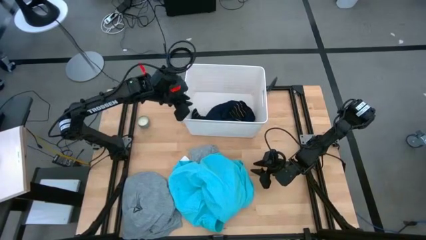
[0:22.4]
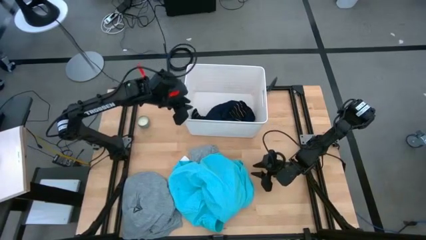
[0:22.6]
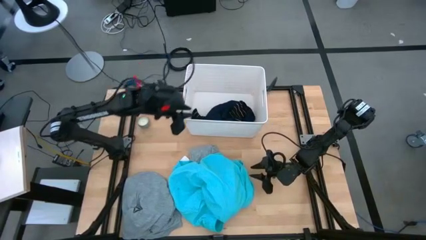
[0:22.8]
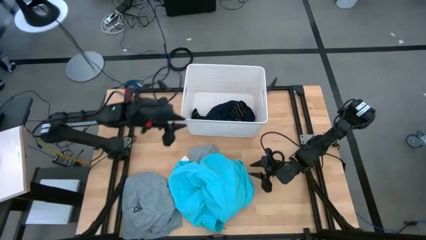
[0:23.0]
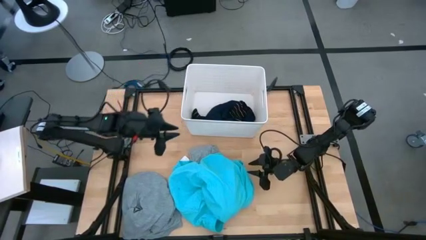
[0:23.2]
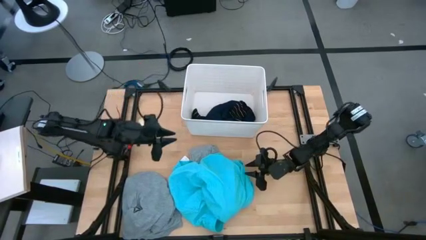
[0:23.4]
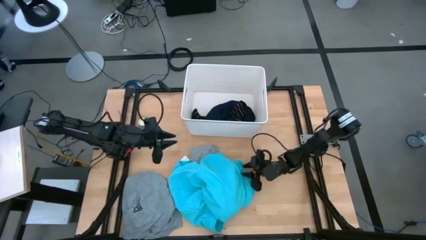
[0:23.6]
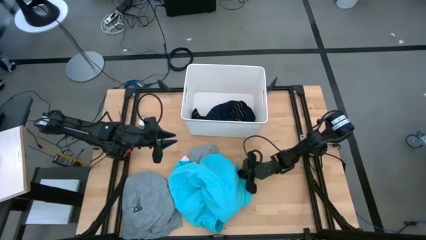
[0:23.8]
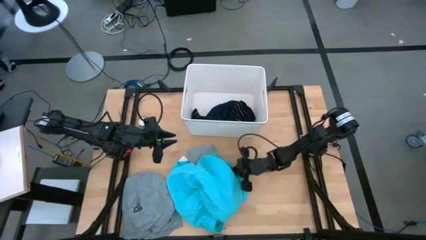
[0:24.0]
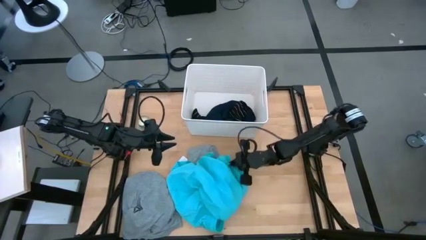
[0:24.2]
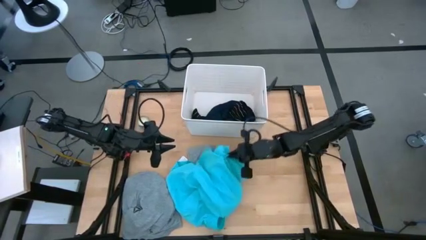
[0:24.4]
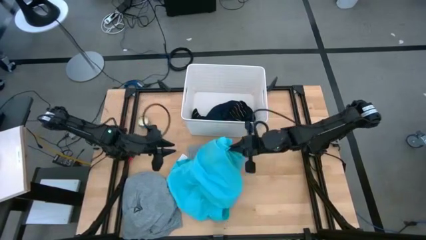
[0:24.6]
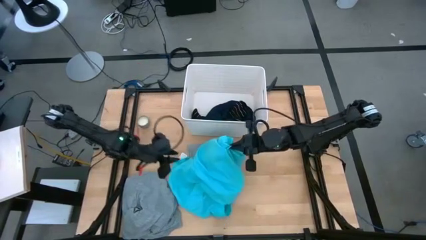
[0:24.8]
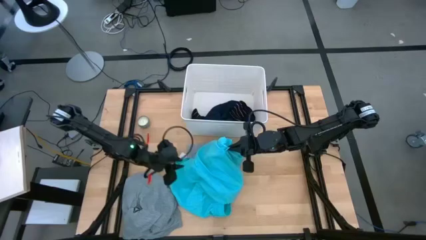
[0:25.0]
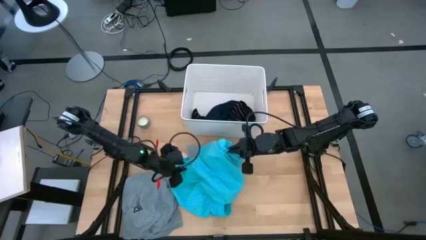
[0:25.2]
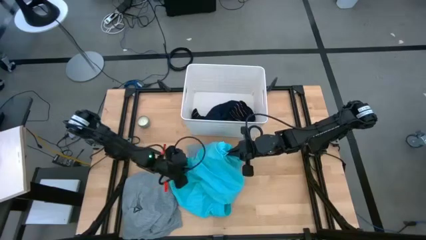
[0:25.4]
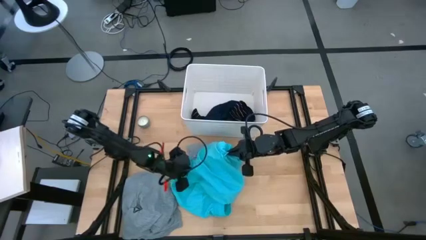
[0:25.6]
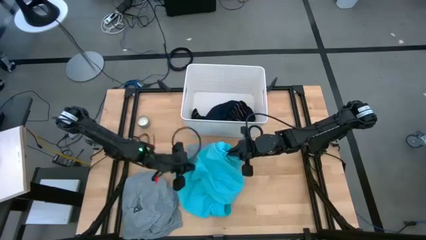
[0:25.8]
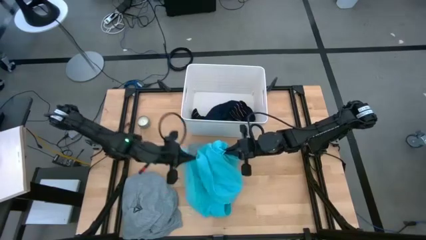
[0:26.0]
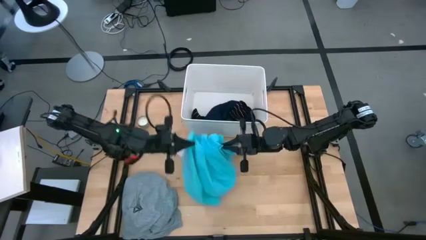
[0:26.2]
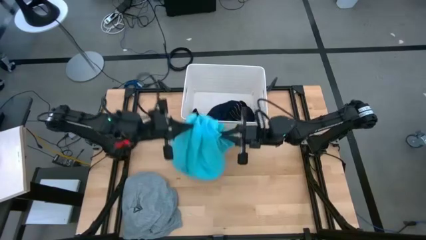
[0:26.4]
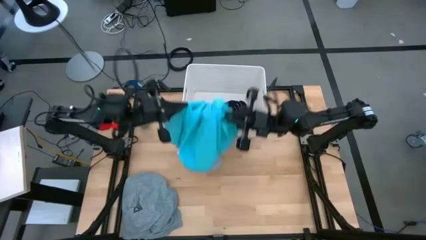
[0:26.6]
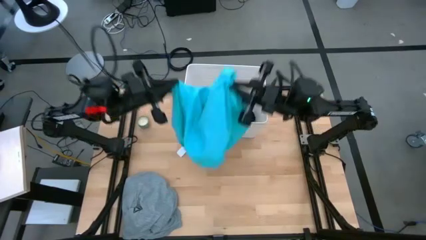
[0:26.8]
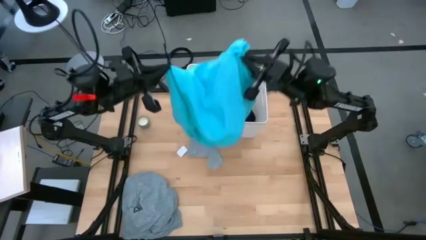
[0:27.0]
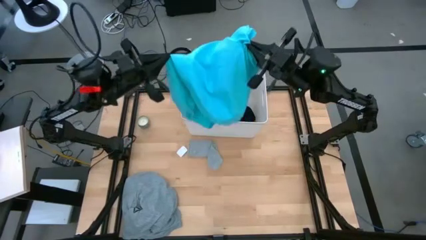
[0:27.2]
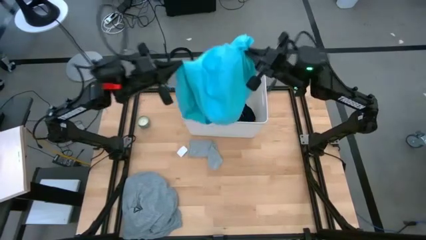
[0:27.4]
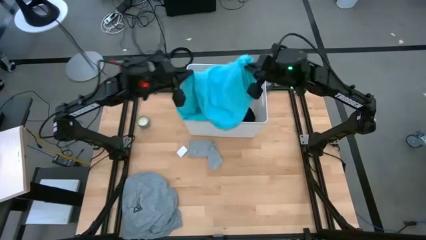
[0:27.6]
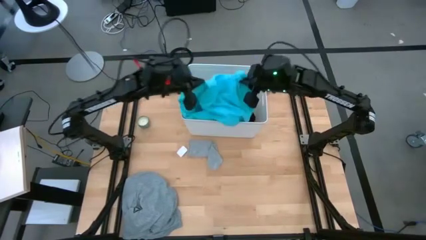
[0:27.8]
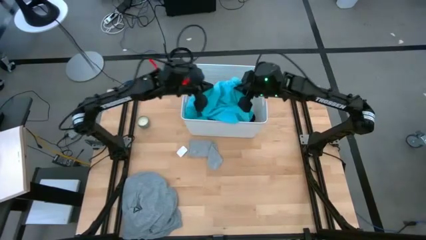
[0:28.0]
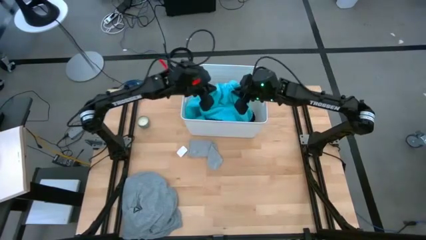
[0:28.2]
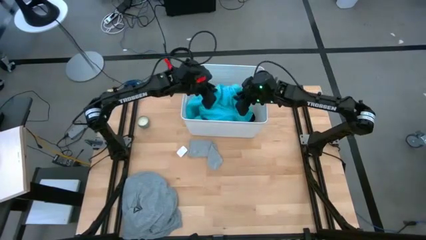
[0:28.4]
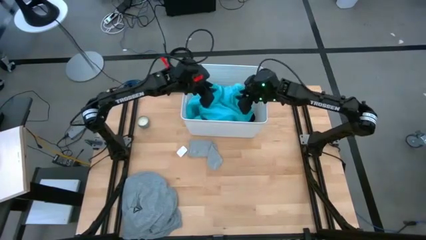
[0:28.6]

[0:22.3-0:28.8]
Task: Sort clothes
Put the blue shorts into the white laundry bin

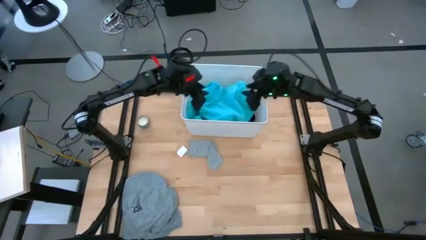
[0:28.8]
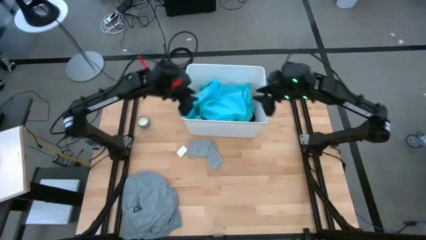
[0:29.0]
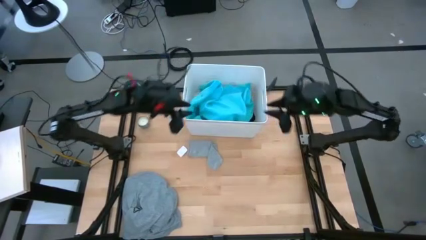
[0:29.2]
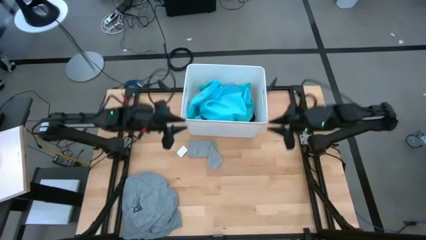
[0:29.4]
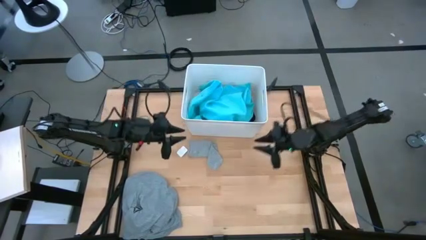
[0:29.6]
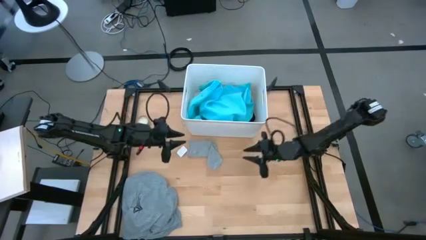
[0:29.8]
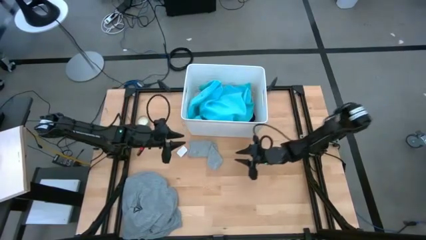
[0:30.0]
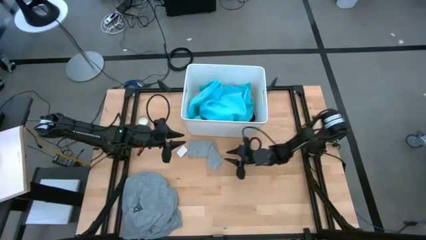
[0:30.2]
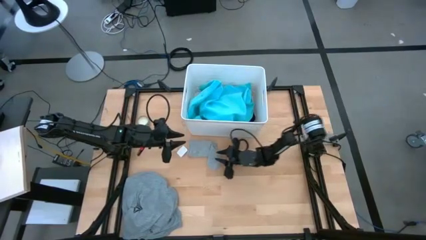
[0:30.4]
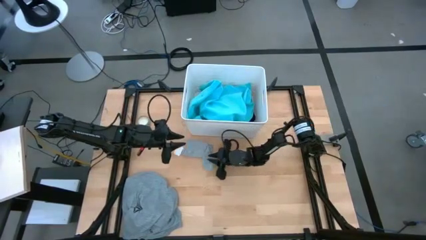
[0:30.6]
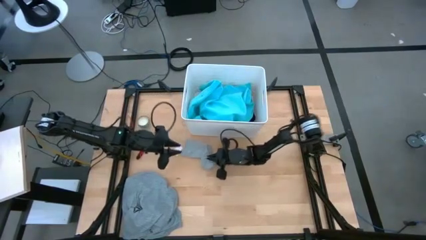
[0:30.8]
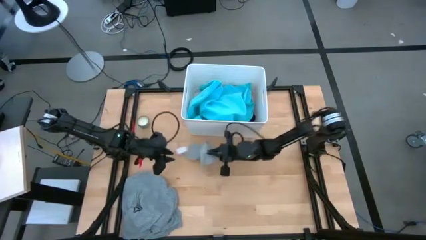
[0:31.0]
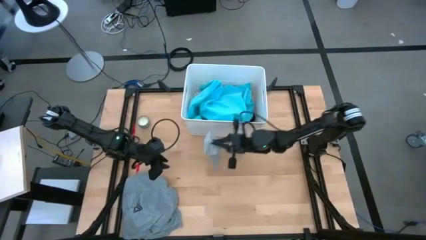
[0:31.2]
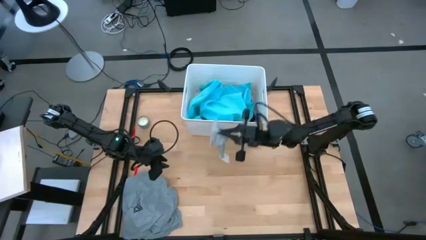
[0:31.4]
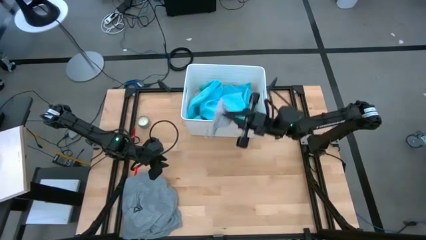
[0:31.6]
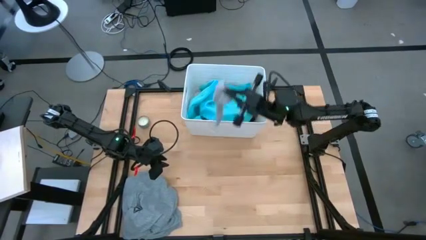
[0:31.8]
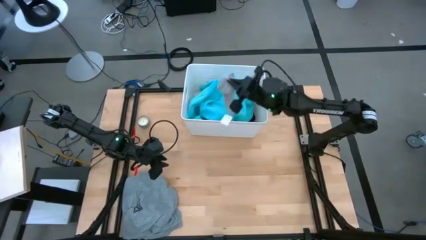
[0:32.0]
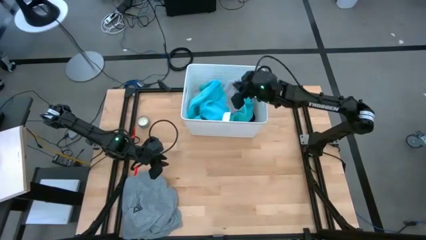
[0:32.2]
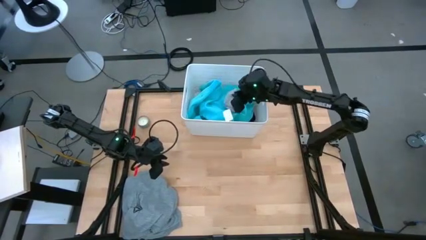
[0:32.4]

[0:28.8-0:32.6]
Put the gray sock into the white laundry bin

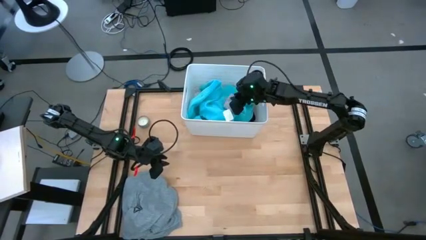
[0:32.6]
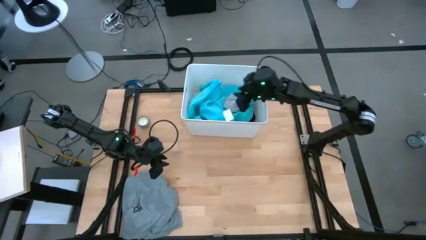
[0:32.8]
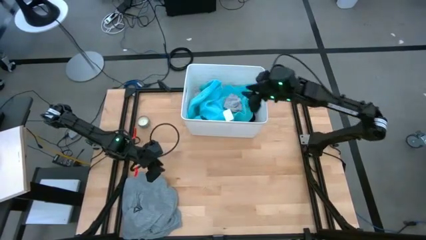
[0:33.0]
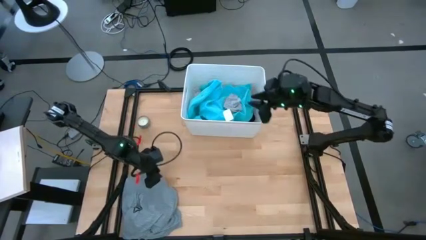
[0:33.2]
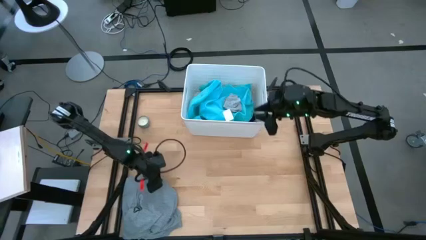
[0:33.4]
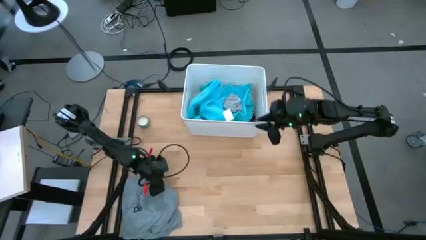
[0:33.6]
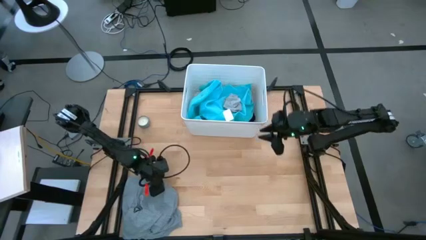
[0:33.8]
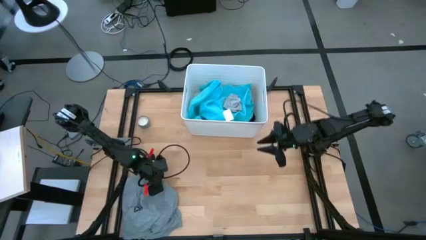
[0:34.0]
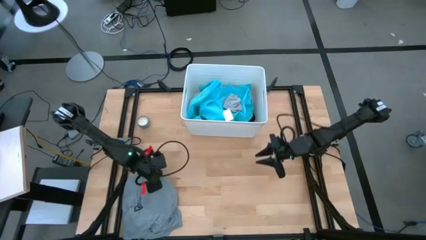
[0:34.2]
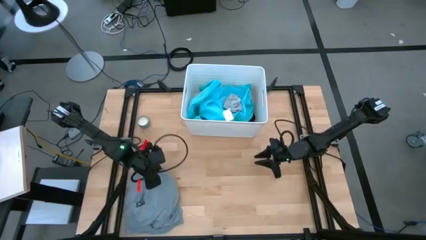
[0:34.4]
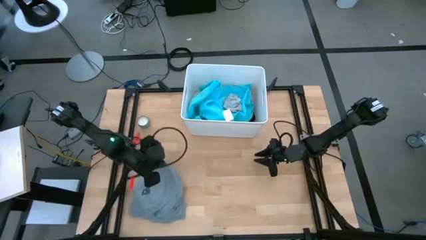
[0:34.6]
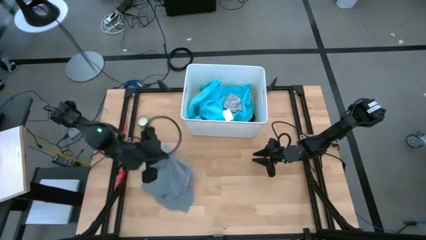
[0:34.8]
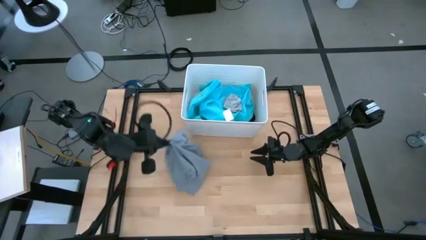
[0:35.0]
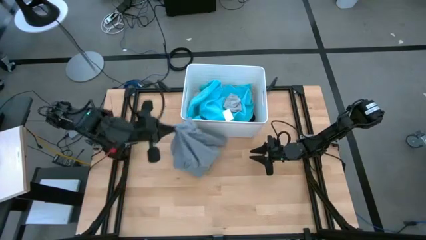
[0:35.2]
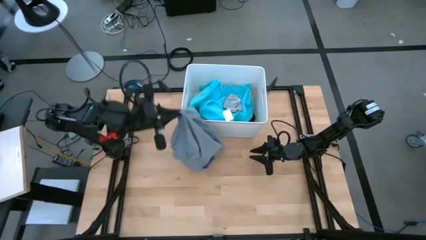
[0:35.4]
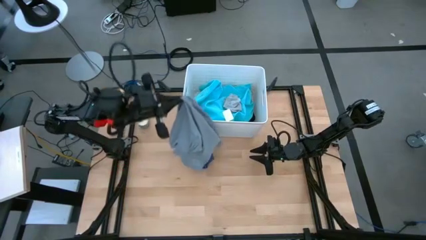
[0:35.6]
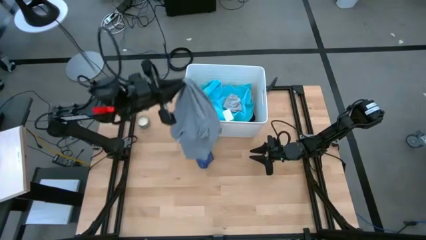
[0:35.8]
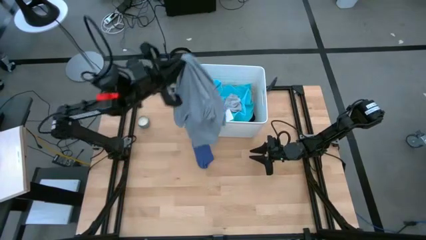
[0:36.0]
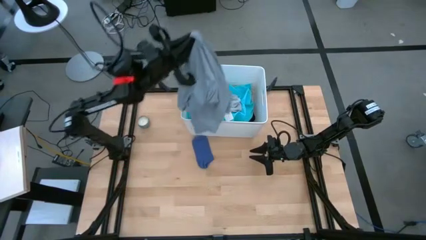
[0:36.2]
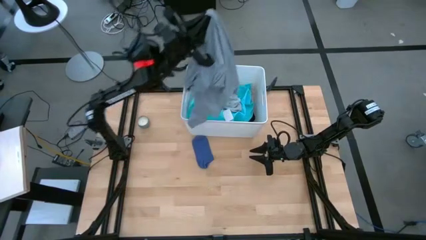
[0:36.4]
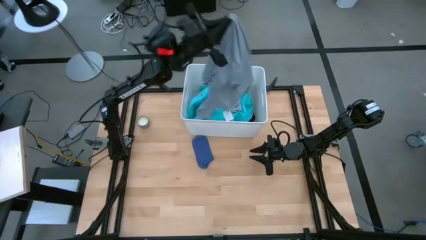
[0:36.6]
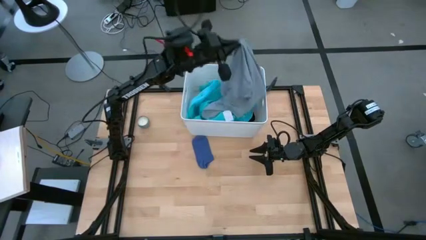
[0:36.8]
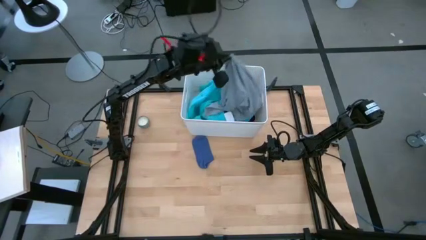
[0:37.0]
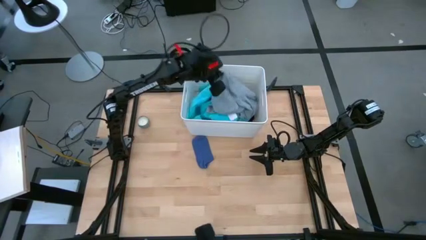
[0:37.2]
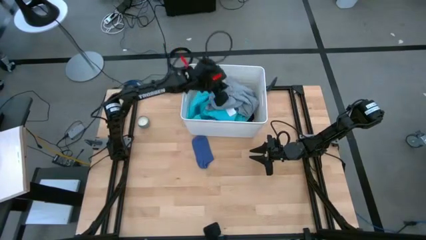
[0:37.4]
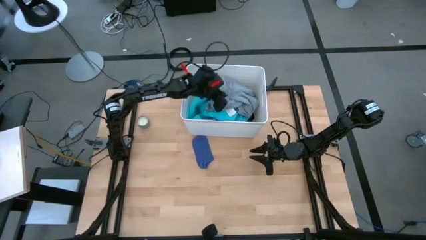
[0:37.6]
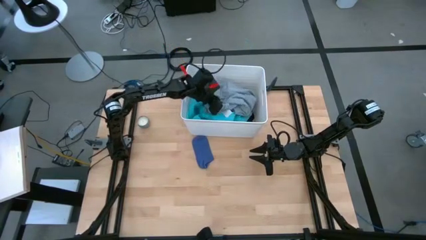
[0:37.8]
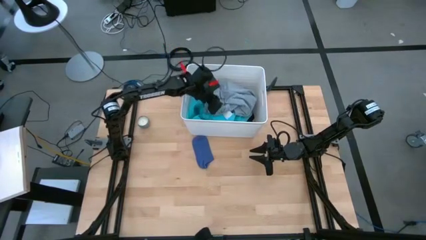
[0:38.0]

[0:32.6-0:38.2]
Put the gray shirt into the white laundry bin

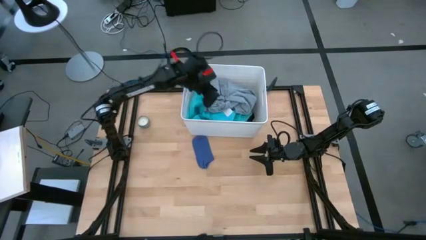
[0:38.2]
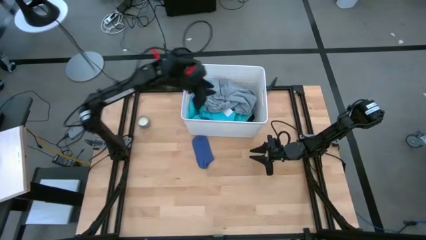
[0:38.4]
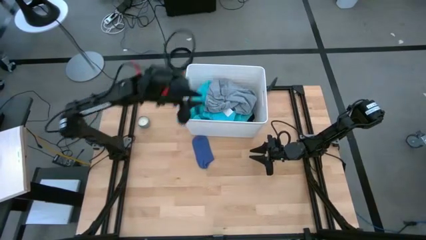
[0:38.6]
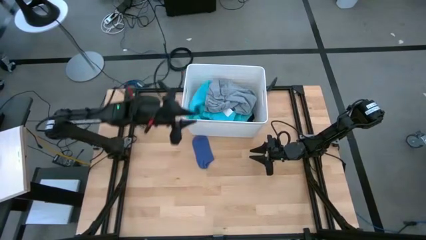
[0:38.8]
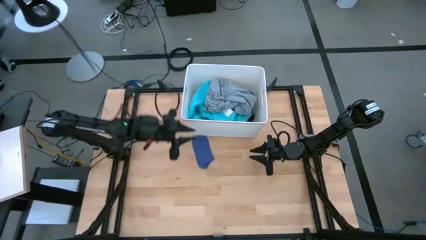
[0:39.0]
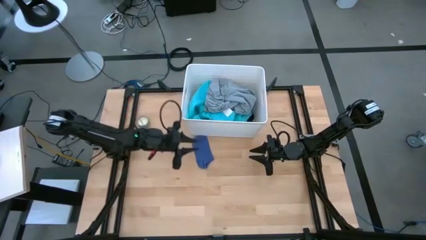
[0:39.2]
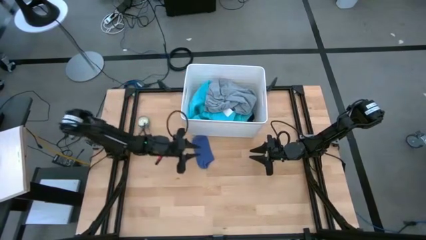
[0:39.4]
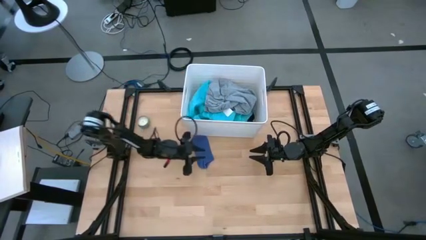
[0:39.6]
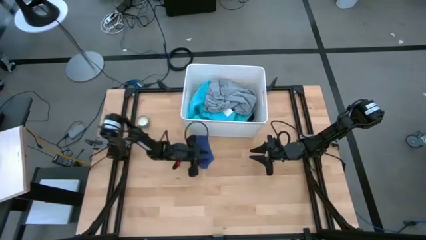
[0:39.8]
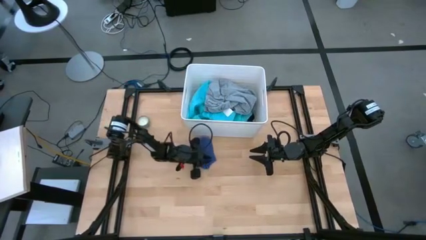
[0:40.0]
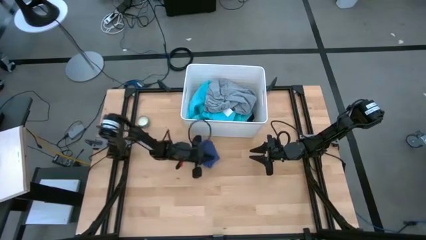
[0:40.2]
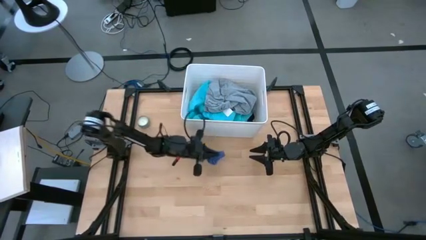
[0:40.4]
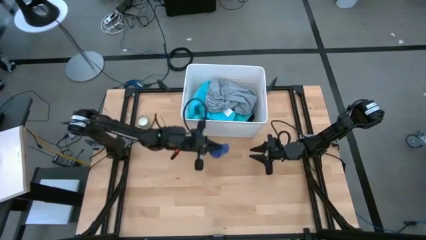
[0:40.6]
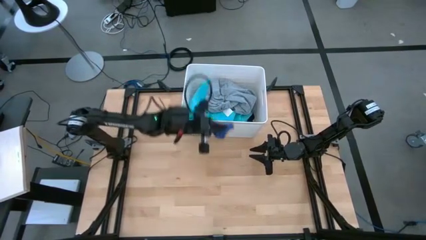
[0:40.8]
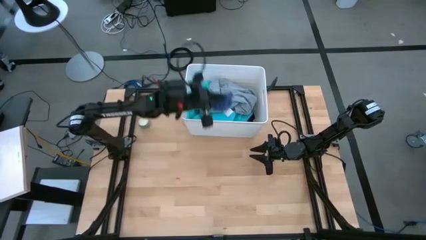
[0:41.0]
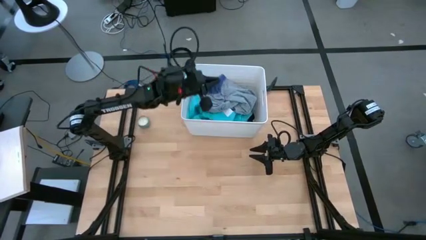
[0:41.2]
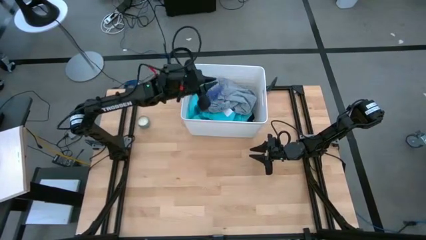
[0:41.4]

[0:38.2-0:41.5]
Put the blue sock into the white laundry bin
